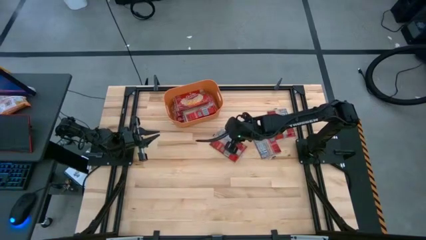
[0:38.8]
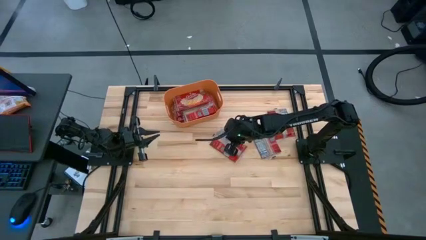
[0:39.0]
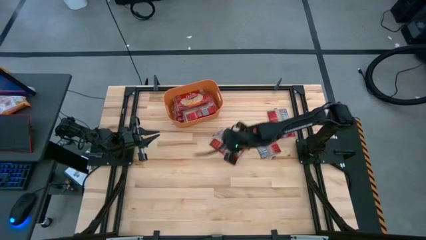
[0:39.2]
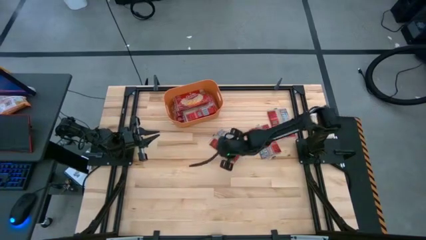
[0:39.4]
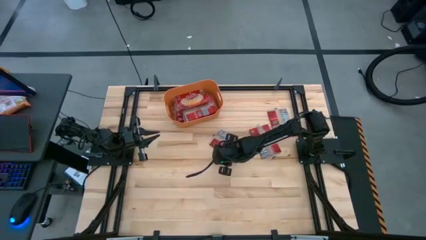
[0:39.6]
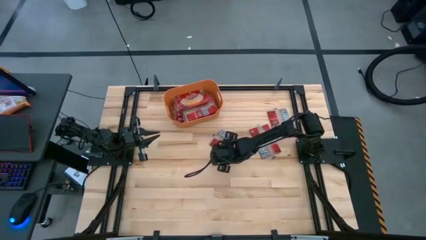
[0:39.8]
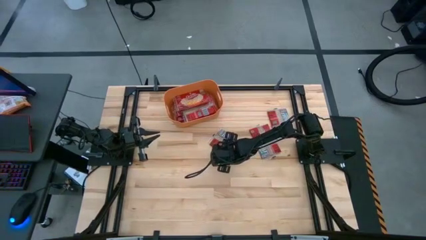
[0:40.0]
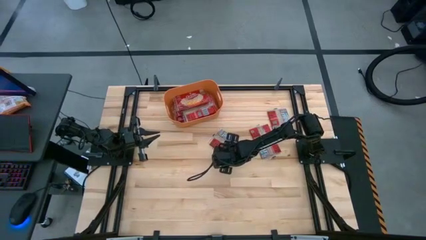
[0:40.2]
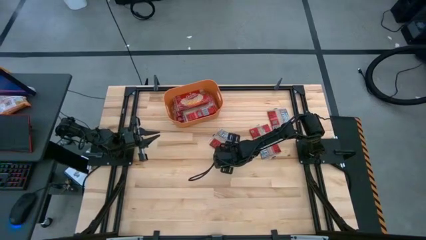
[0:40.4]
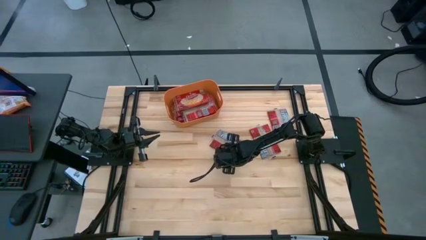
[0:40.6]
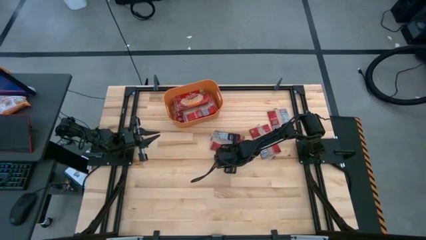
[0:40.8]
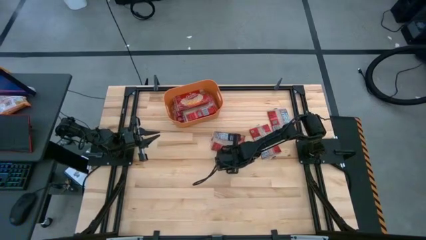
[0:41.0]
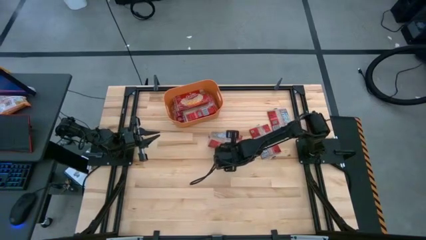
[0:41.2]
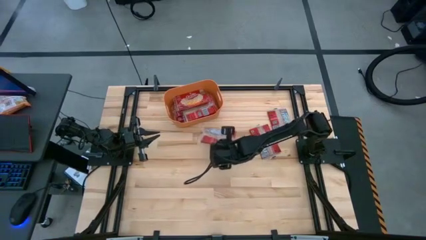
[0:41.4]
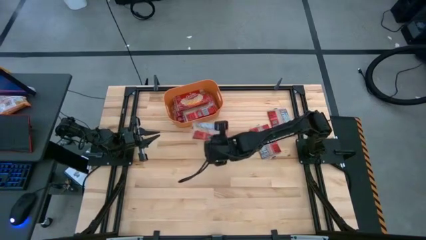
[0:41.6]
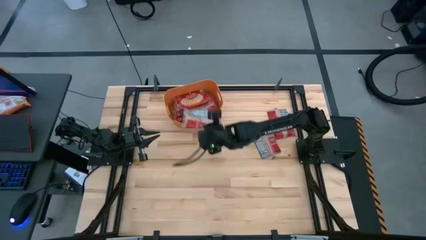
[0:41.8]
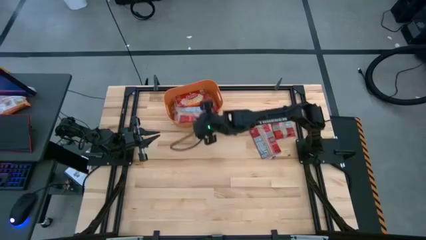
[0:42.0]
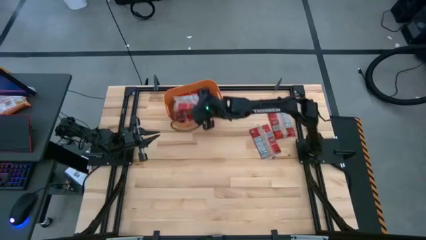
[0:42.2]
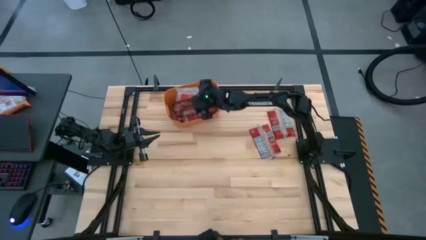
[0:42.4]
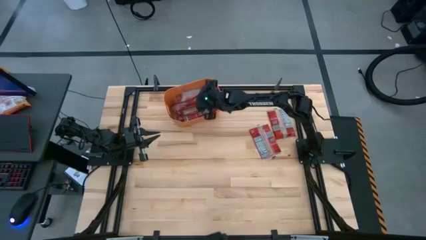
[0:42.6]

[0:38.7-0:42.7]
Task: Sort popcorn bags into baskets
Put the red popcorn bag into the orange bin

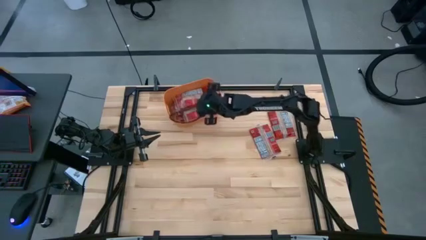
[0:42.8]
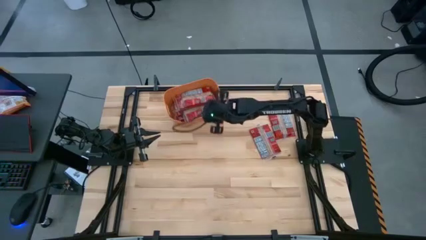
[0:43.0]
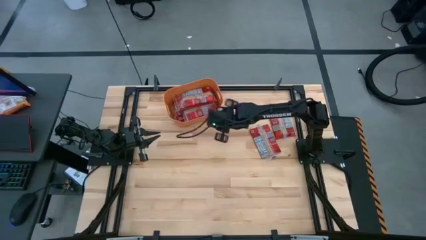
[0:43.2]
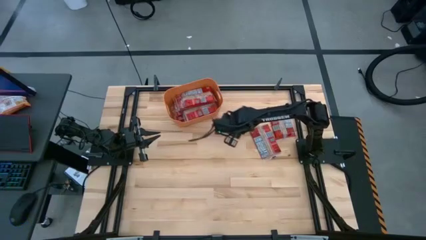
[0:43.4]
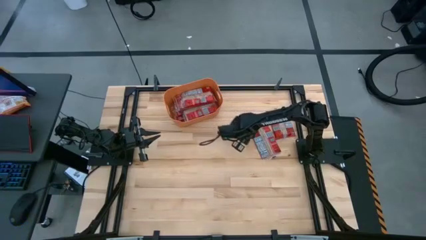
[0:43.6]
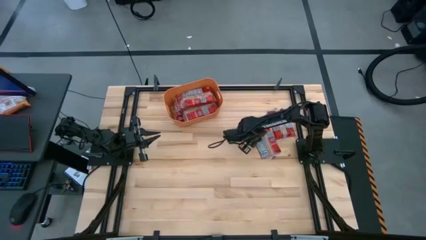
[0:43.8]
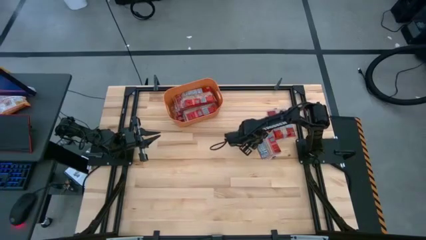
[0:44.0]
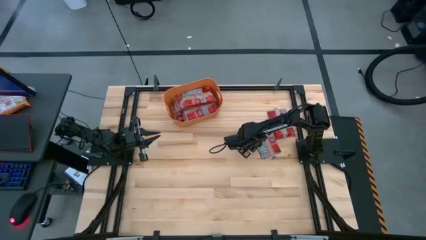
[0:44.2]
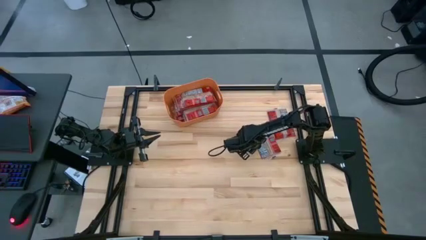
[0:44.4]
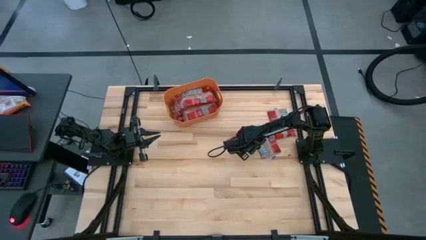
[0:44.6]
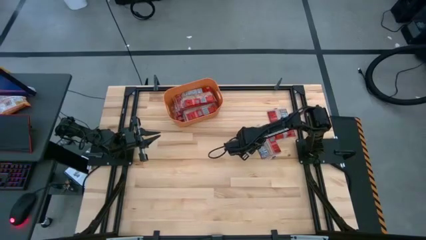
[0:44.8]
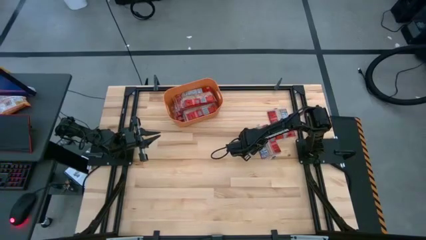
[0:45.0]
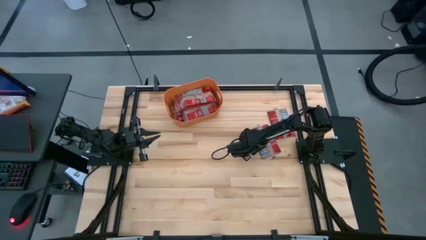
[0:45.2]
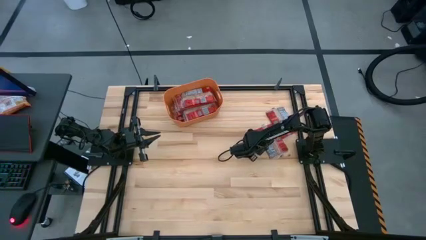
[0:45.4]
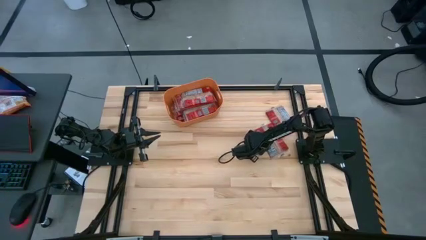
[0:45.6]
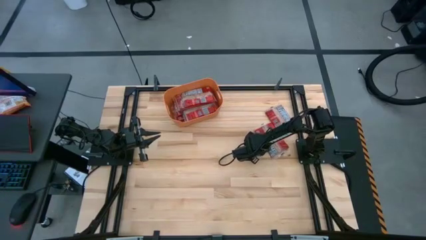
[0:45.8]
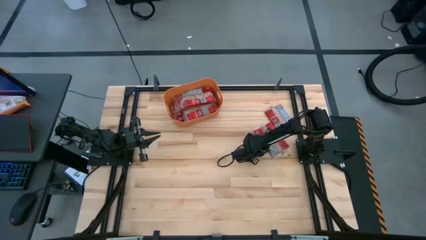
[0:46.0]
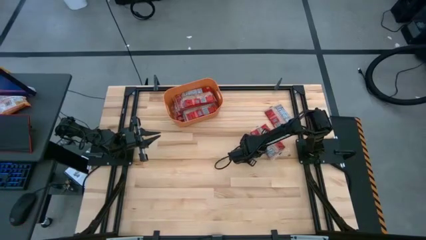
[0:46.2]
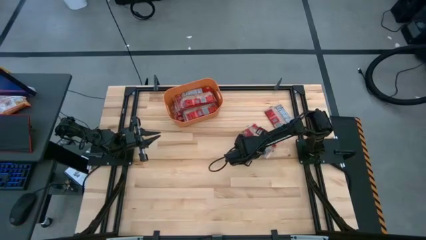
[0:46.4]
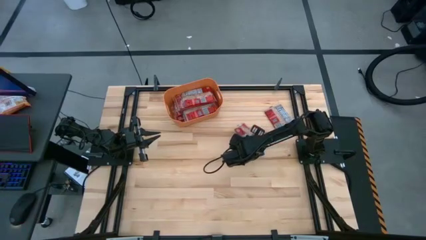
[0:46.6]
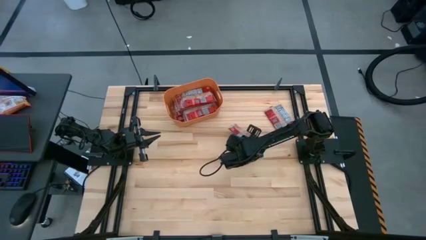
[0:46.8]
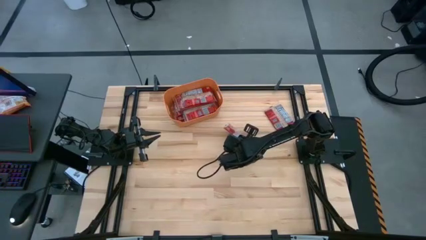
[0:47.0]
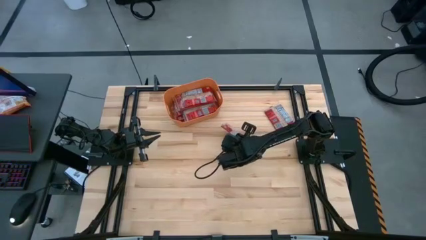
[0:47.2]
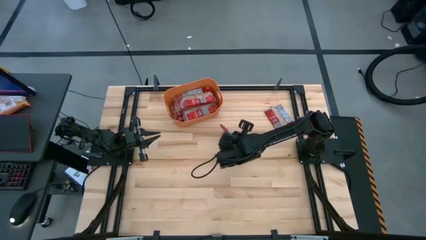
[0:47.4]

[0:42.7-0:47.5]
Put the red popcorn bag into the orange bin

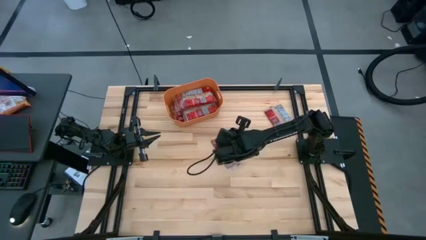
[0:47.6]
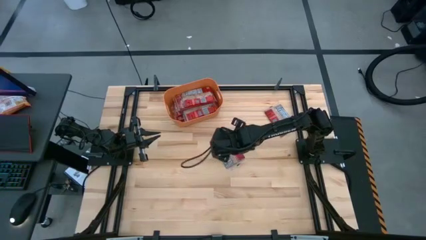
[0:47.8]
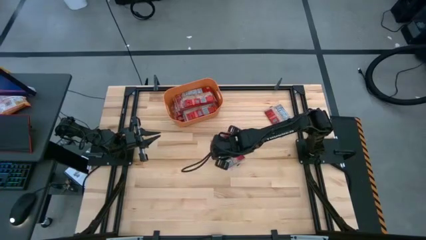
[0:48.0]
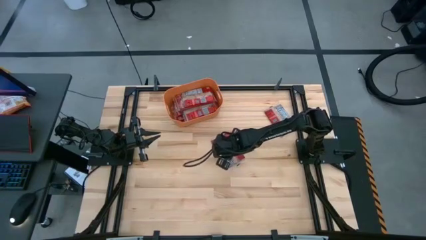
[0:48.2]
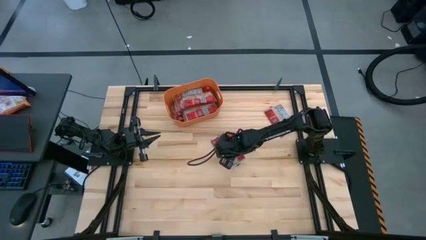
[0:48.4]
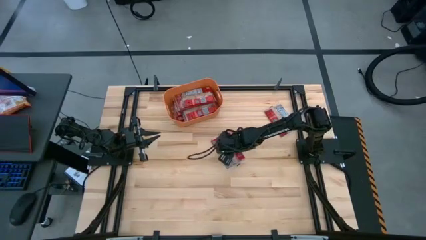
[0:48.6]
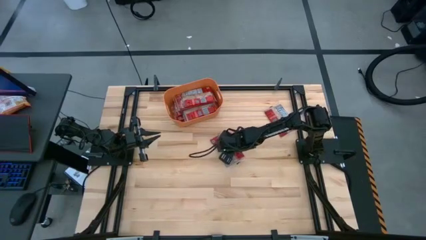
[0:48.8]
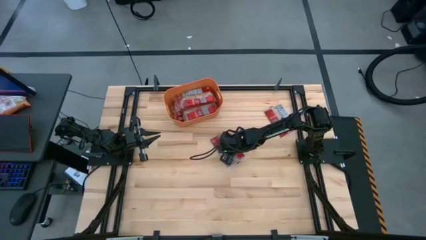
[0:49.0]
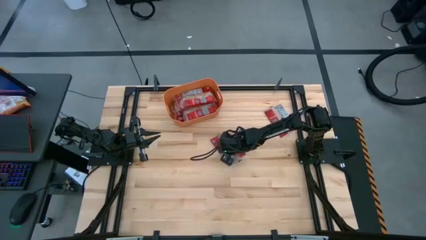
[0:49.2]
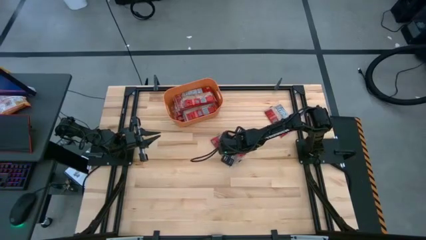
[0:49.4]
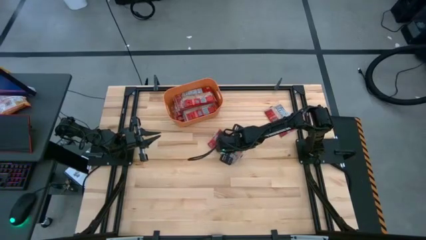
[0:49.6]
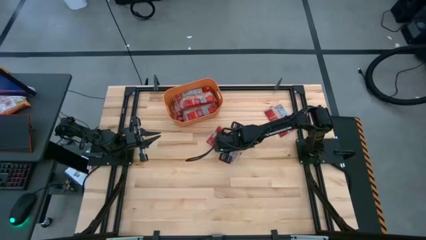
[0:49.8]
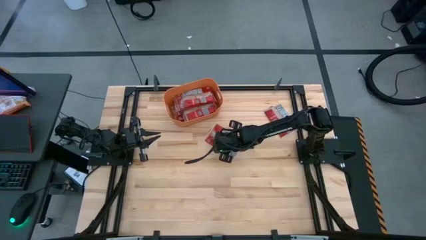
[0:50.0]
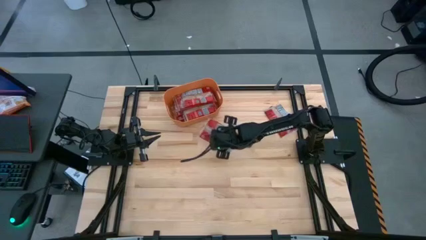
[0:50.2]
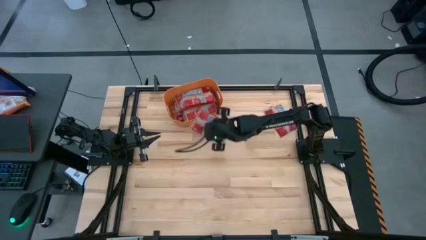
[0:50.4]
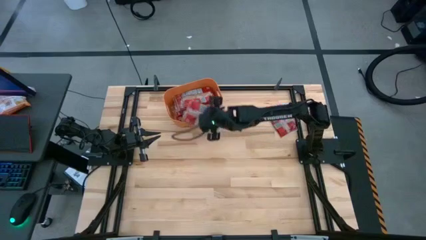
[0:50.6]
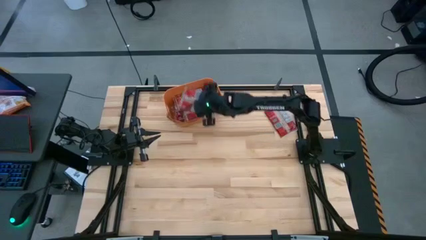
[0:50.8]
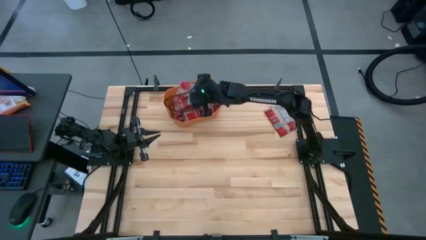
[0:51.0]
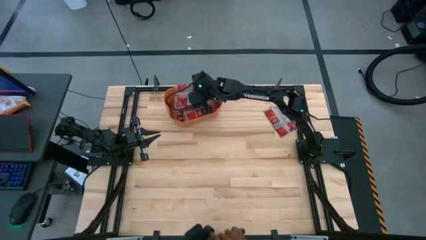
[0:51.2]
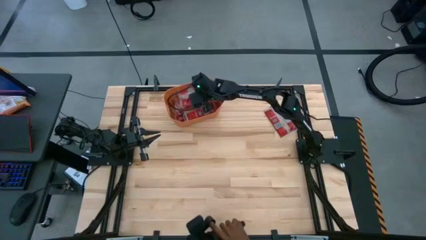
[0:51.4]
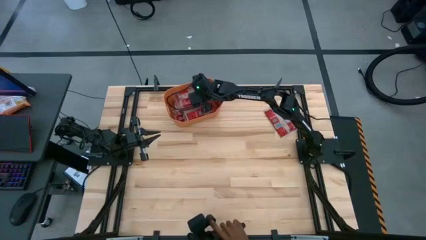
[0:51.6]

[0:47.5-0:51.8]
Put the red popcorn bag into the orange bin

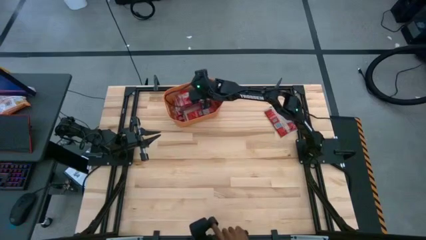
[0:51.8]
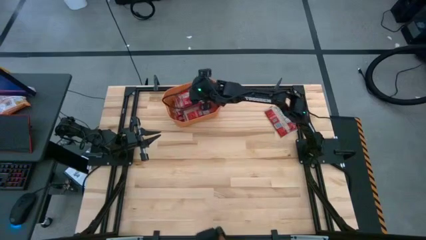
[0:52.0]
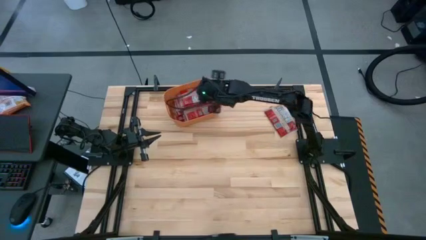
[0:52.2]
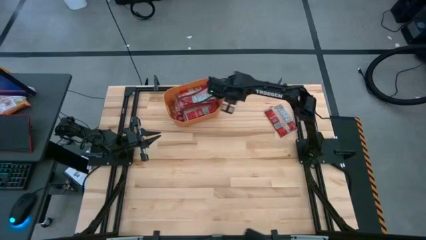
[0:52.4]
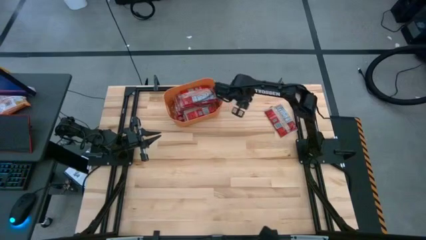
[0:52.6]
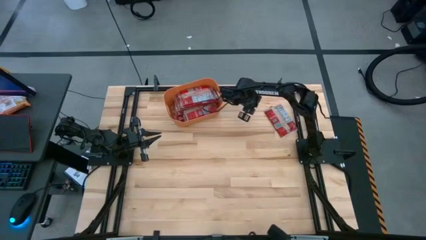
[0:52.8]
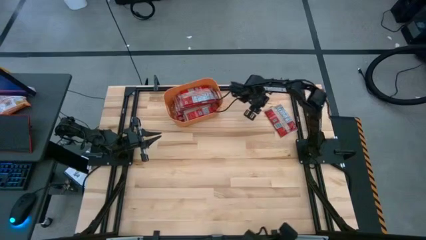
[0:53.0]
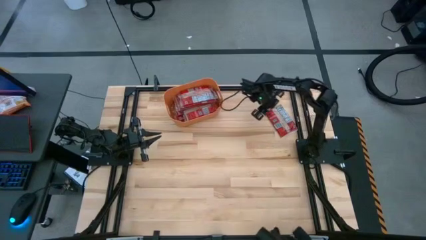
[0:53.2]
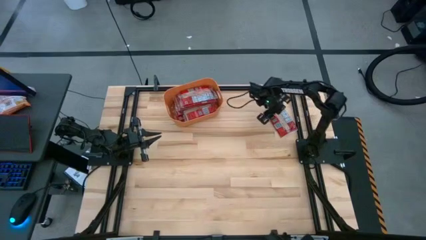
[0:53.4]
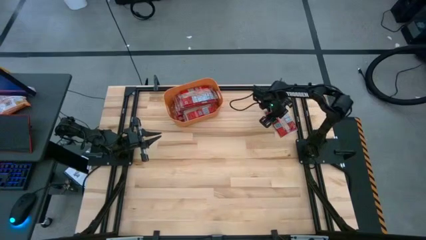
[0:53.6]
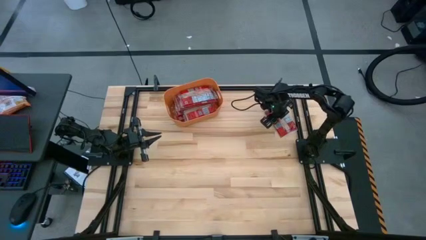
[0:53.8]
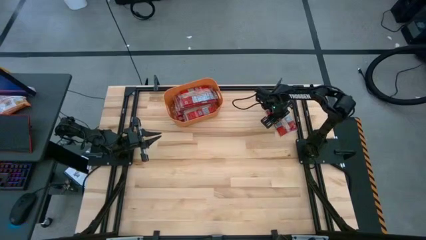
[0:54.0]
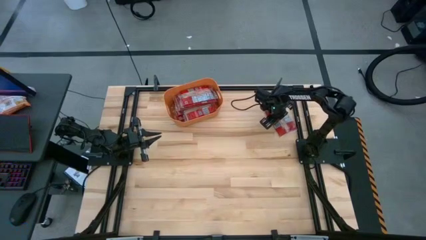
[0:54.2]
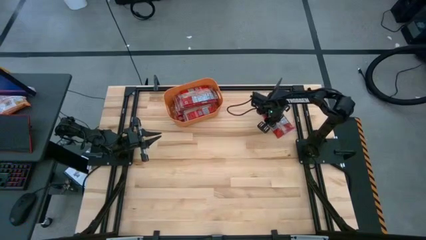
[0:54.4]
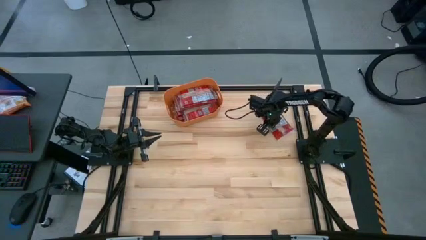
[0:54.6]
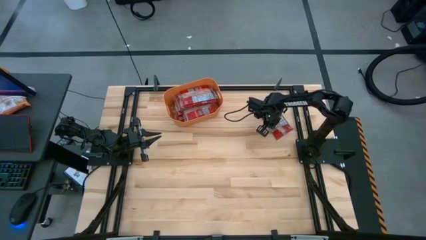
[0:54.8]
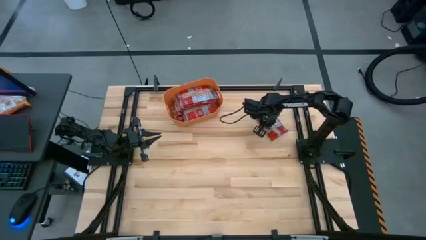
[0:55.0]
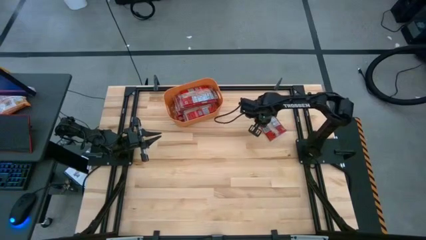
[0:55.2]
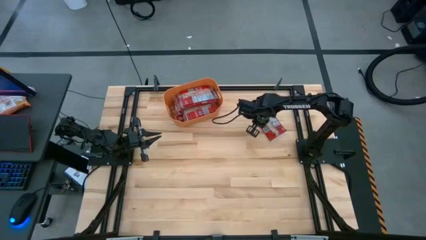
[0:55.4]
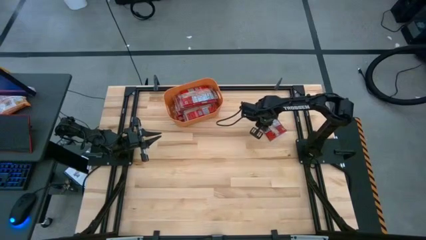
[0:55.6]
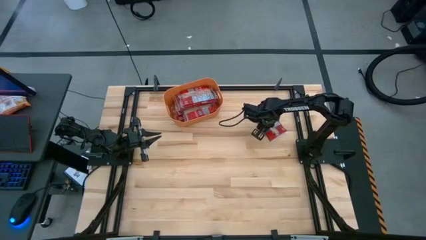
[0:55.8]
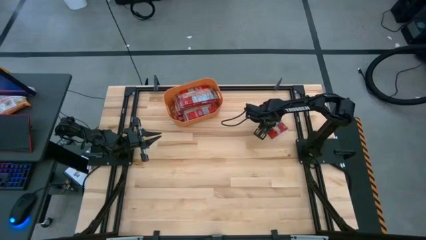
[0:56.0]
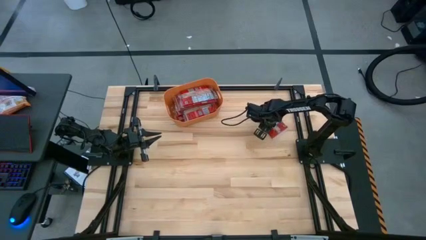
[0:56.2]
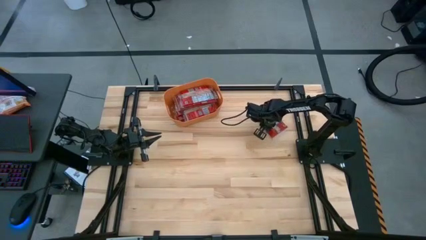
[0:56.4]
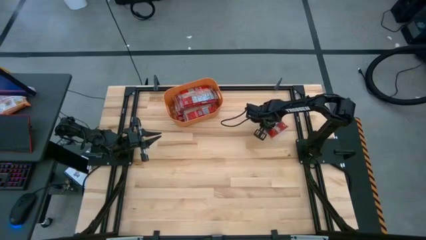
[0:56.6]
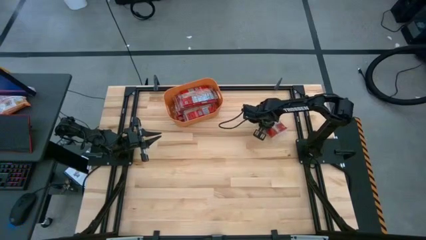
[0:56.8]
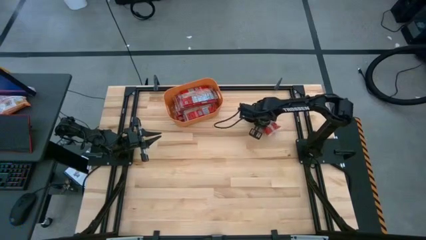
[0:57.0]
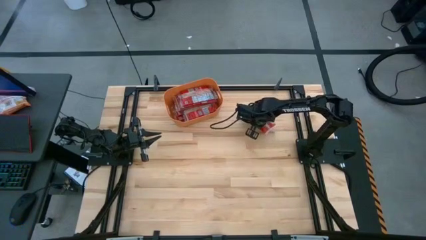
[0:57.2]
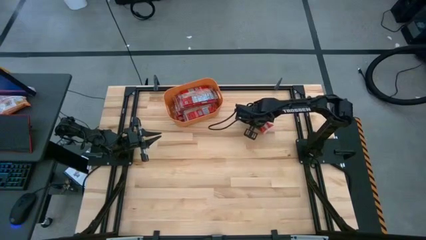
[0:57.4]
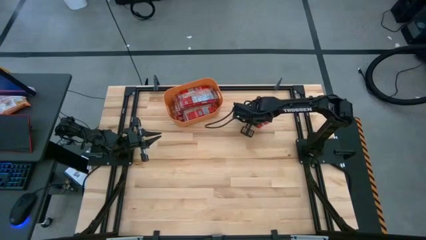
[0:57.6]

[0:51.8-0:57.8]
Put the red popcorn bag into the orange bin
